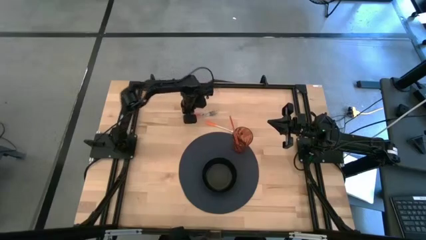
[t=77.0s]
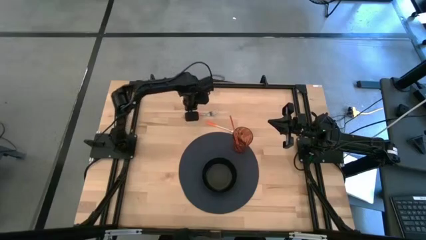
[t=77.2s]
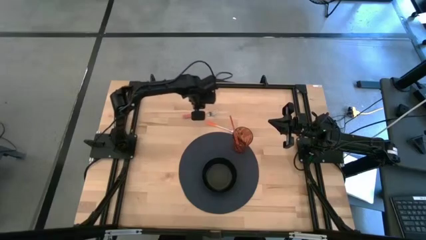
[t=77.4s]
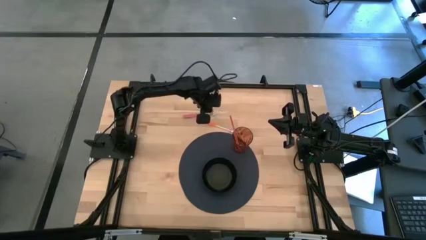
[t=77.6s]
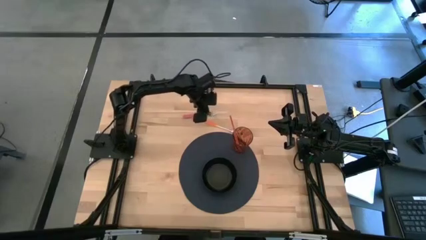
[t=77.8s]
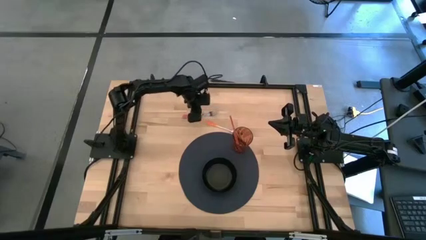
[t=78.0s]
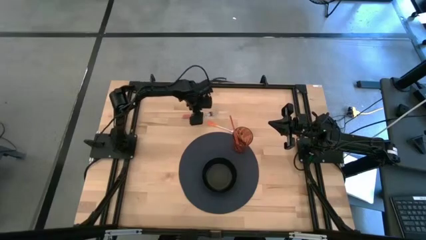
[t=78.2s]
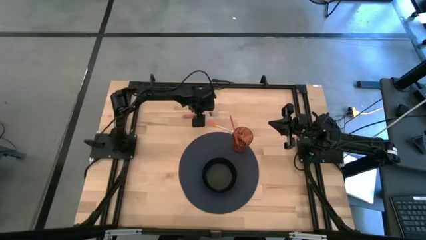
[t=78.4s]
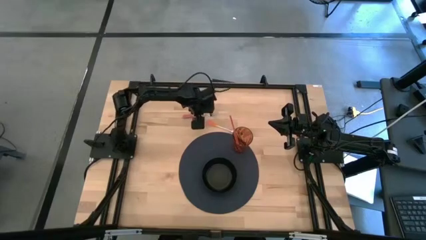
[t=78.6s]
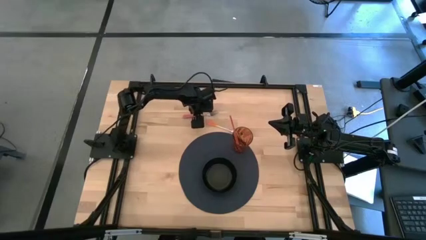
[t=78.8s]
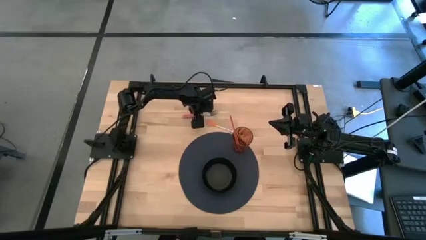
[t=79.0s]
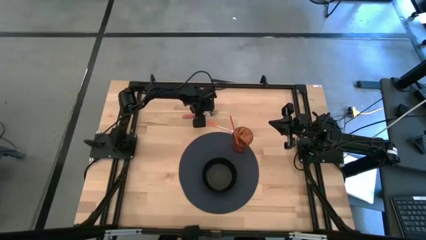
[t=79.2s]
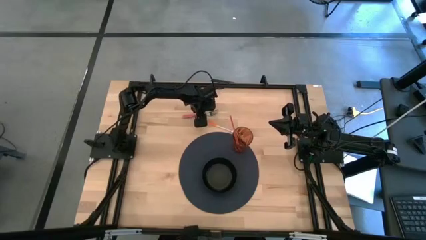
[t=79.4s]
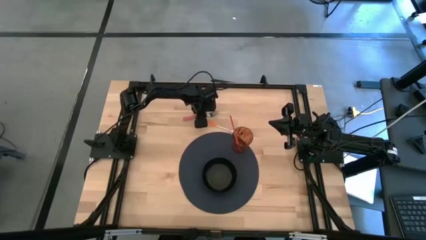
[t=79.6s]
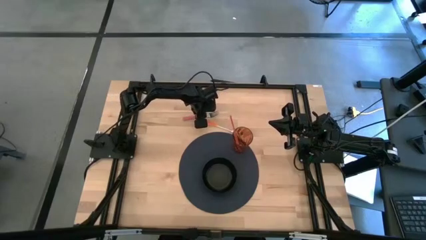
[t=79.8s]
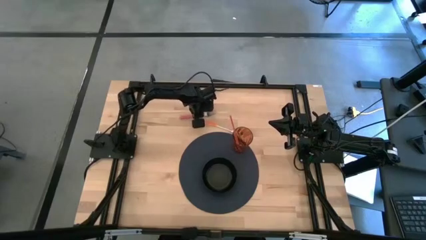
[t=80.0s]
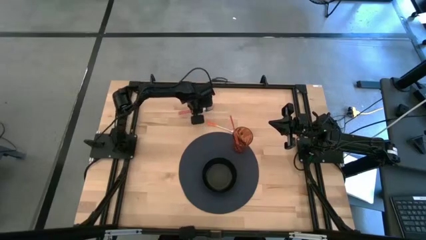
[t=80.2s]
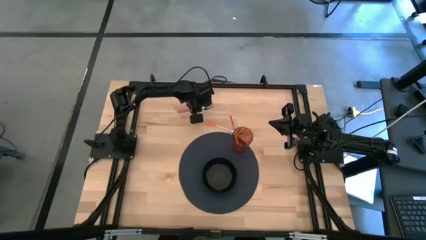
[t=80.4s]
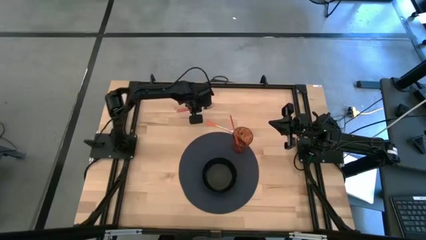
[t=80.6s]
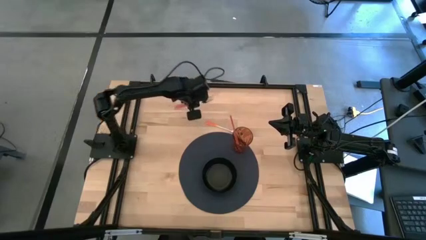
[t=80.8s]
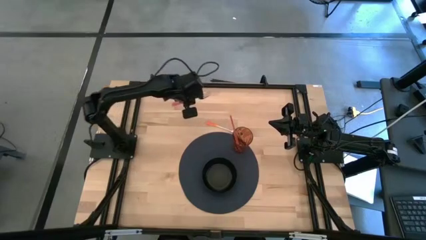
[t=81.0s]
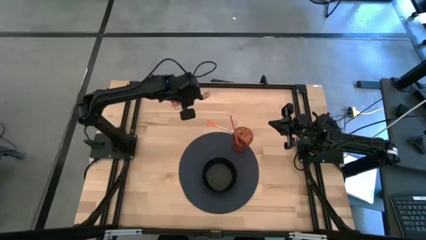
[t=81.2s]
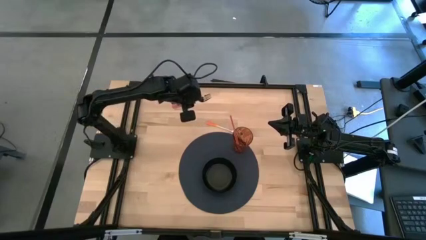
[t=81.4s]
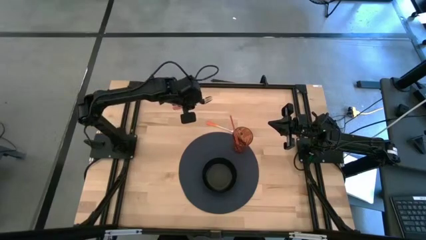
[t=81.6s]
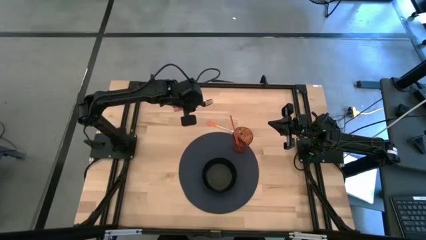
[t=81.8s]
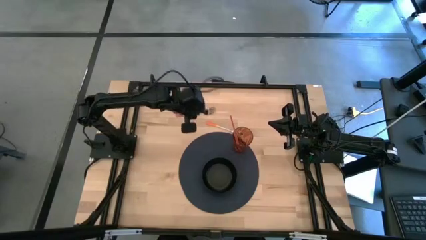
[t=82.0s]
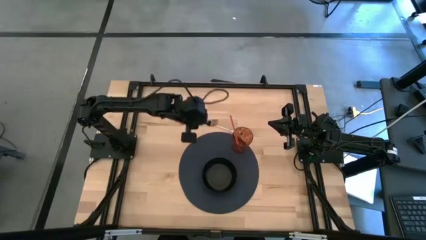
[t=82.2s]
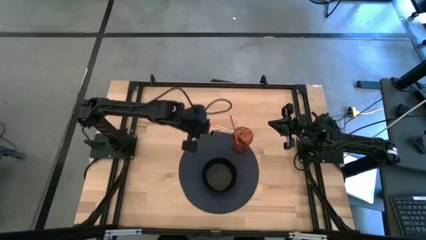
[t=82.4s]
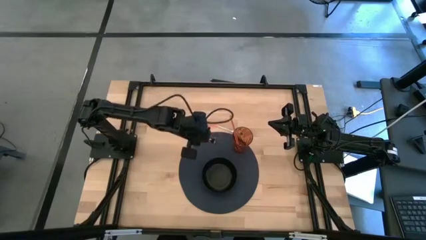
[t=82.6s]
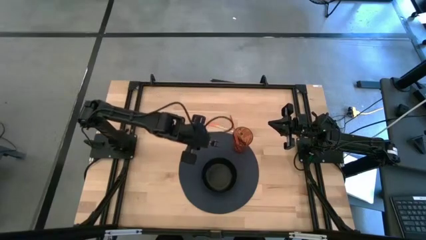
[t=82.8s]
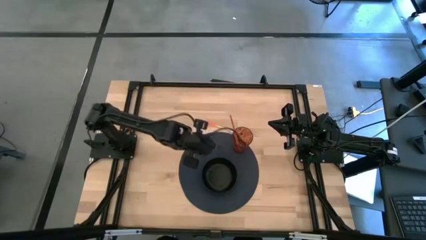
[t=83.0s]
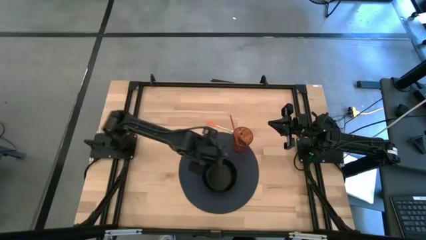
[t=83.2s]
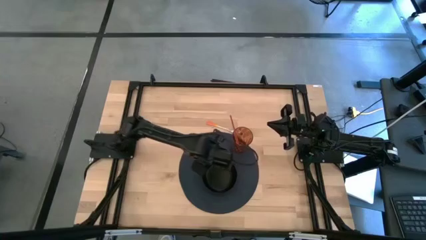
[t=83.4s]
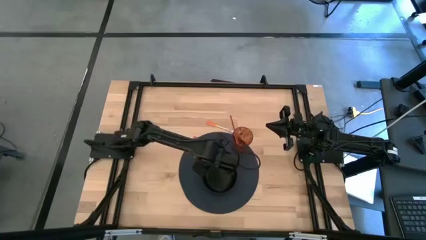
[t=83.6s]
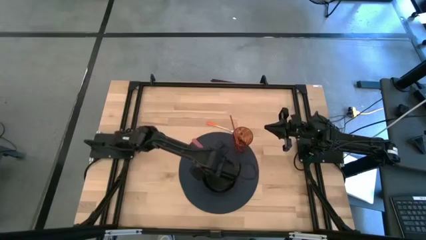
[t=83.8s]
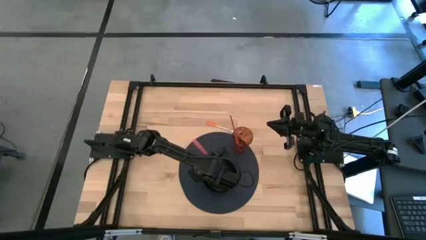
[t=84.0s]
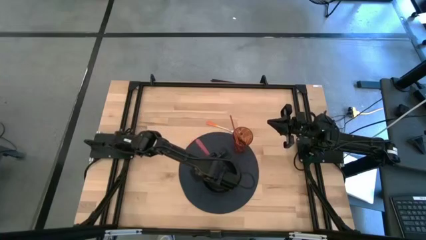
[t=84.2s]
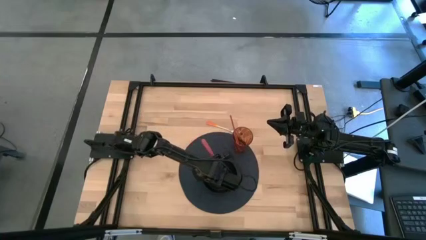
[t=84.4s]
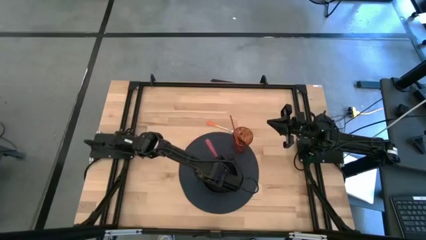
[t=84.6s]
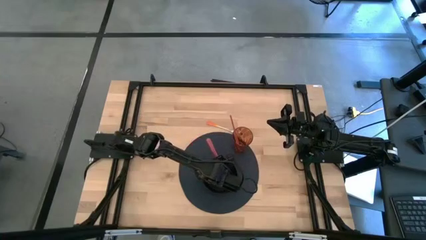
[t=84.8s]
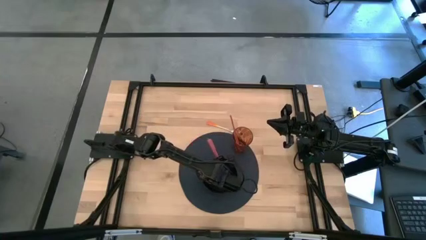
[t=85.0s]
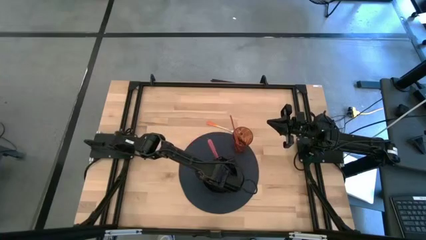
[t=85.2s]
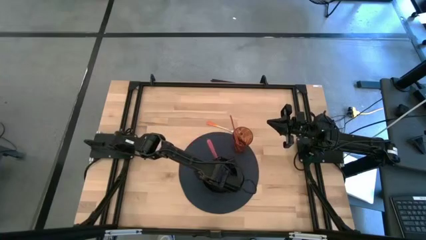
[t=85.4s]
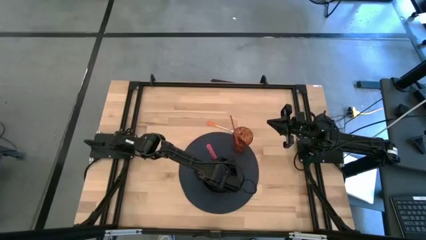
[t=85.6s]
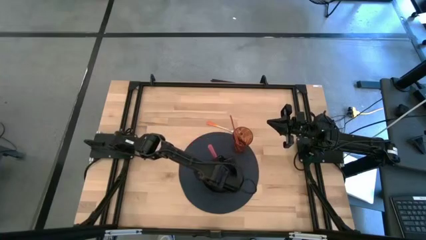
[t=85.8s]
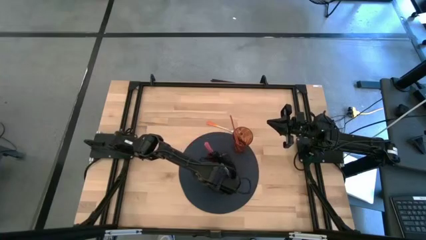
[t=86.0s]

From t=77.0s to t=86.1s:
Task: Pick & Place Utensil
Put the pink fork into the black bowl on the blue mat
